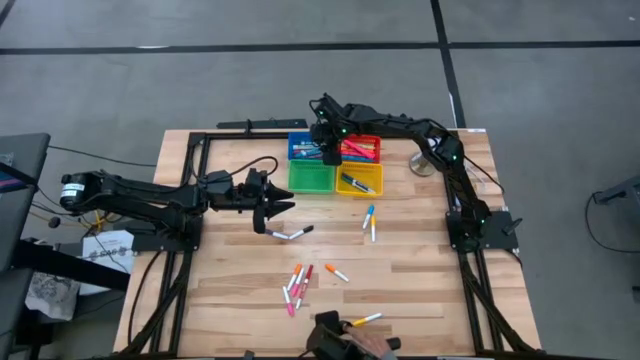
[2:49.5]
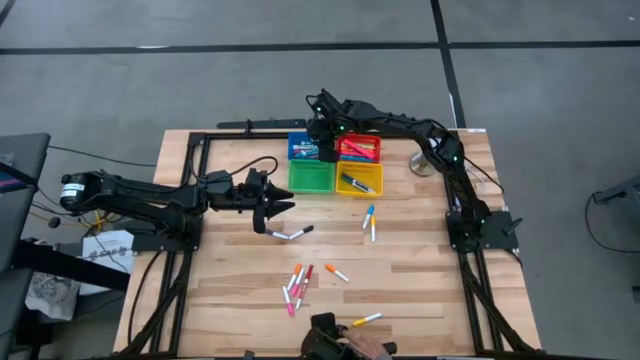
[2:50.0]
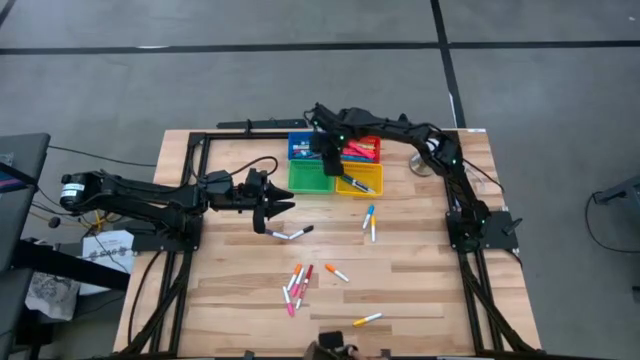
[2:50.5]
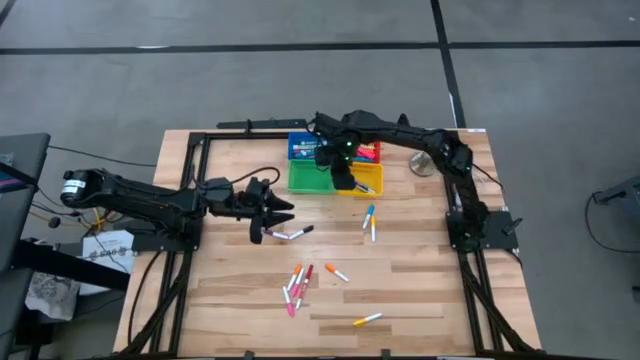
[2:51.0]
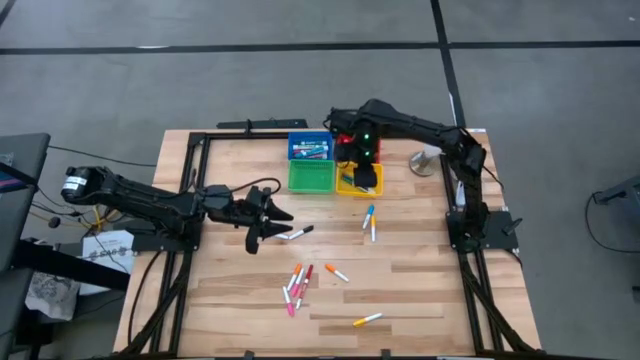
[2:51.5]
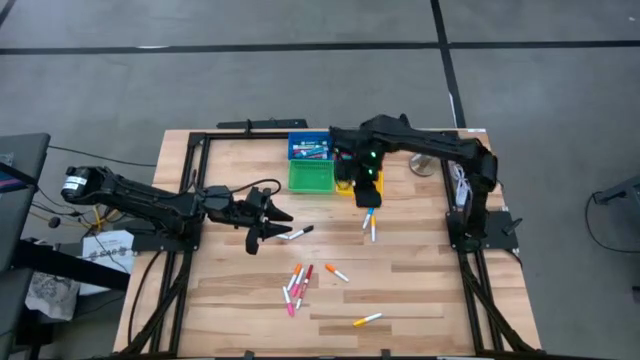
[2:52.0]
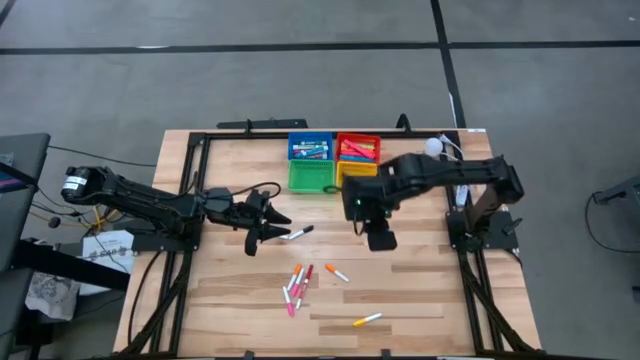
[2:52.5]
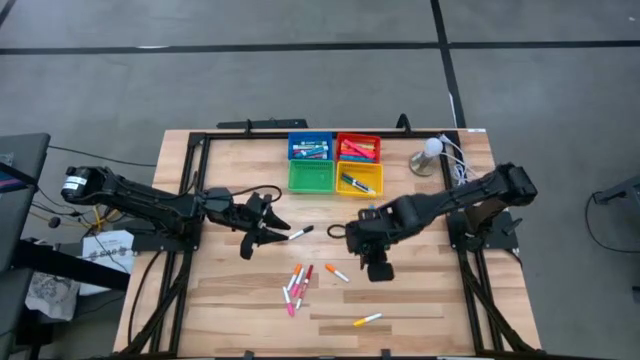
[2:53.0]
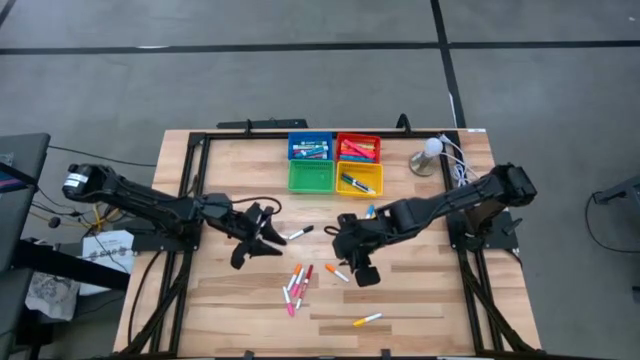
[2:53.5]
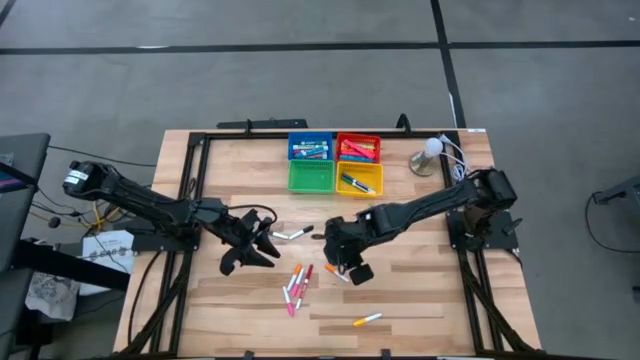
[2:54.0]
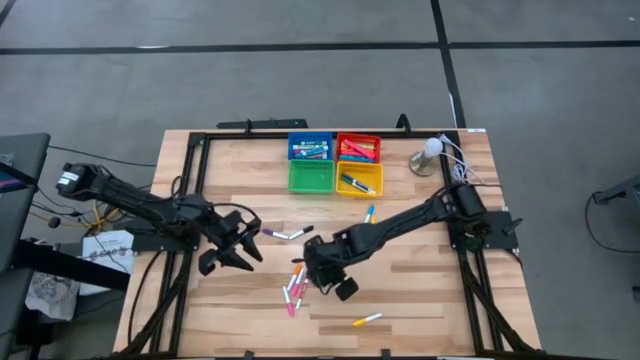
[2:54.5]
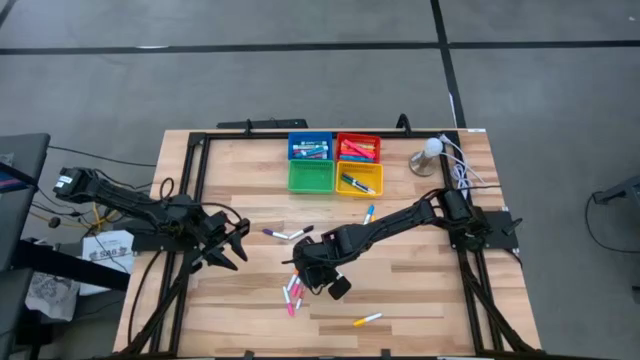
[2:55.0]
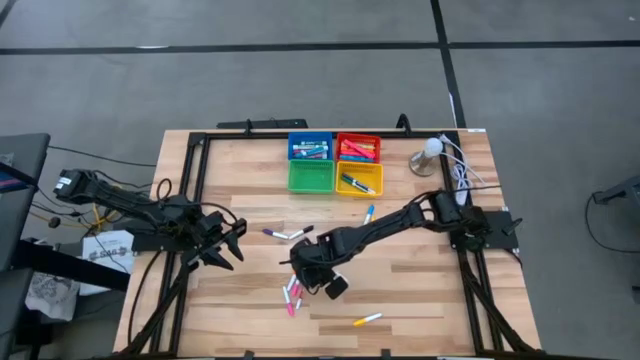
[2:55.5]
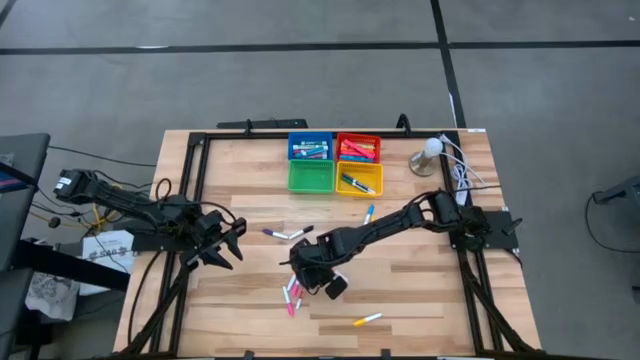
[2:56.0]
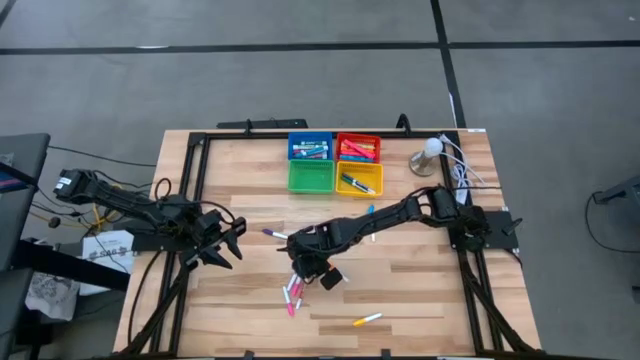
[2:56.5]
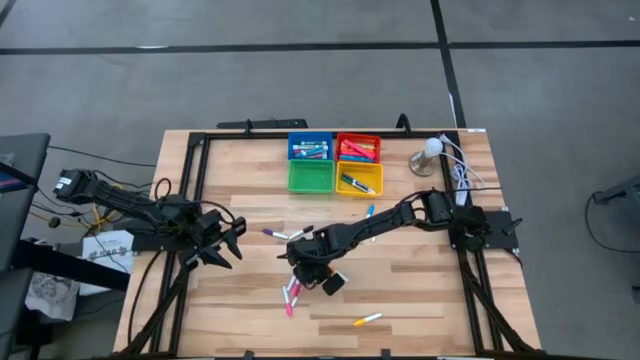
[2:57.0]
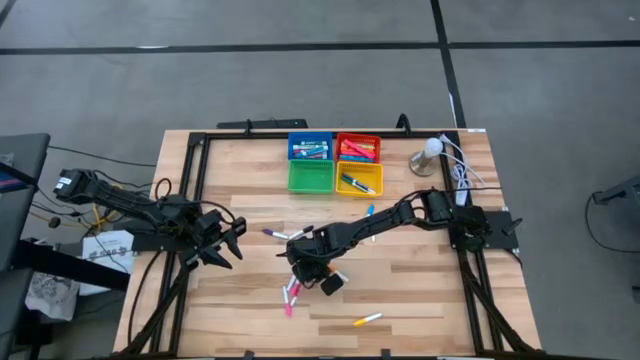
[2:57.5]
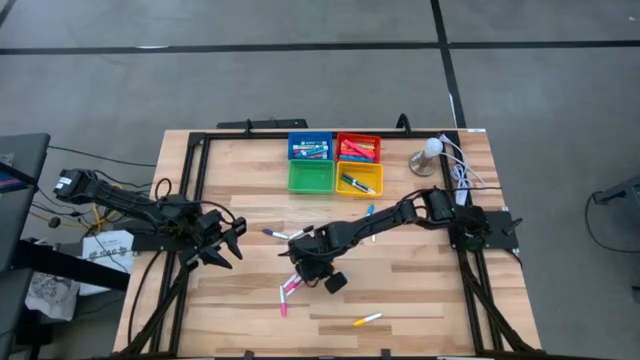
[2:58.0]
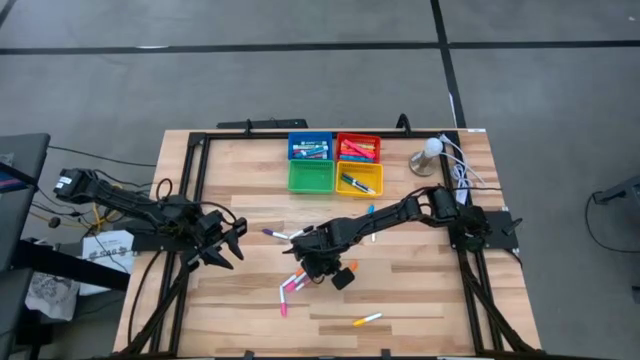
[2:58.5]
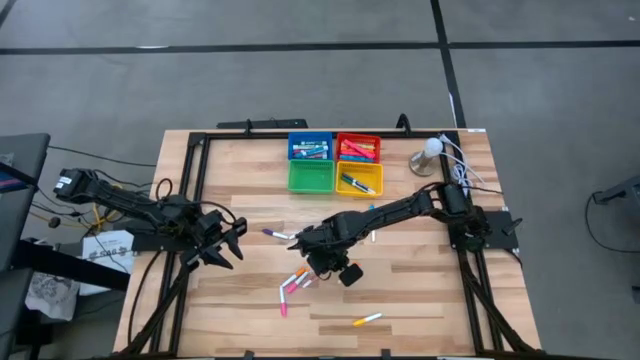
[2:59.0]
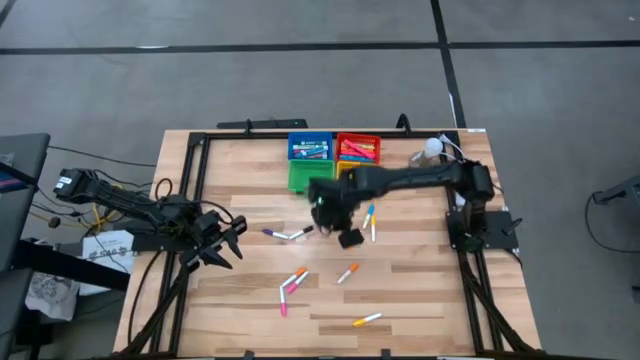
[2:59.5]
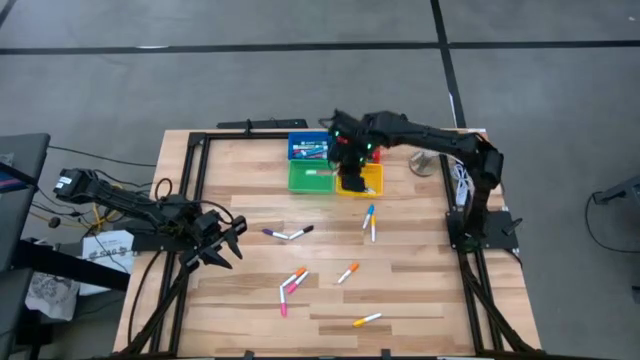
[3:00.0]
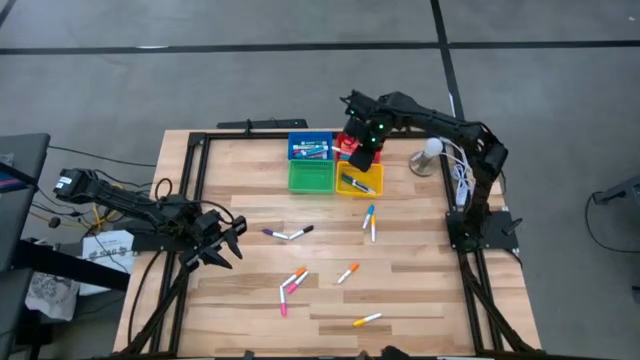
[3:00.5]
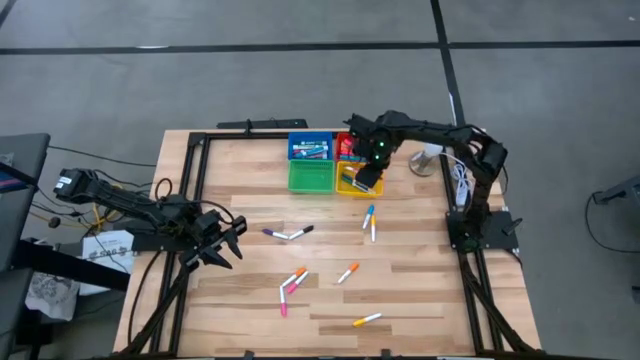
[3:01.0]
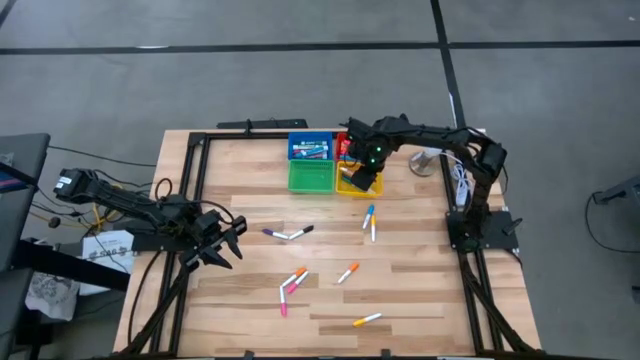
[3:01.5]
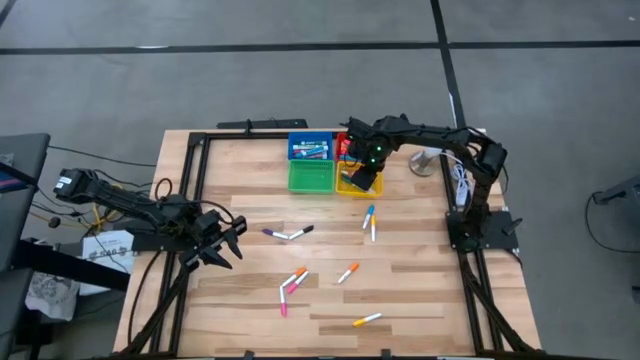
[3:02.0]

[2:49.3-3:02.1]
Task: Pick & Place Markers
Put the red highlighter in the yellow bin

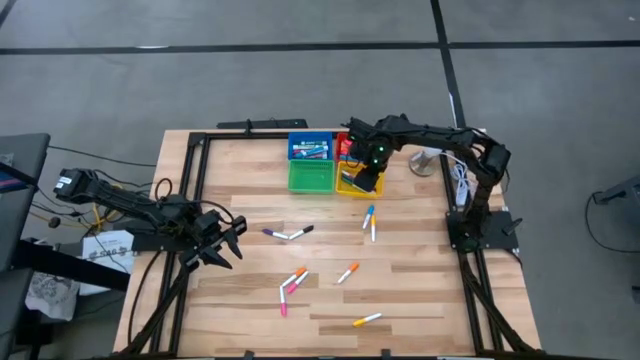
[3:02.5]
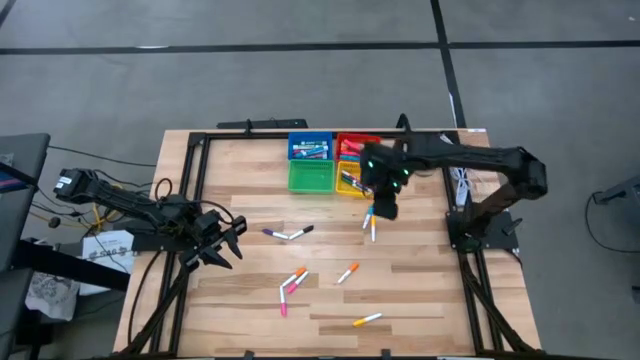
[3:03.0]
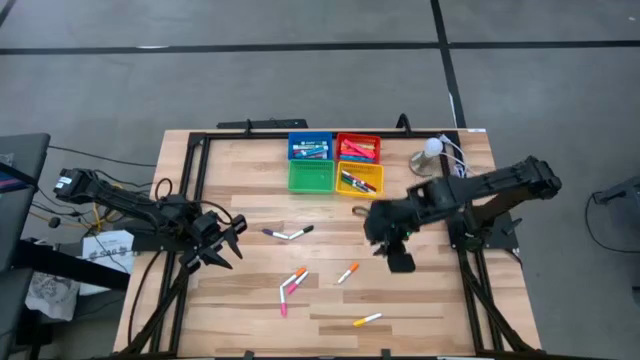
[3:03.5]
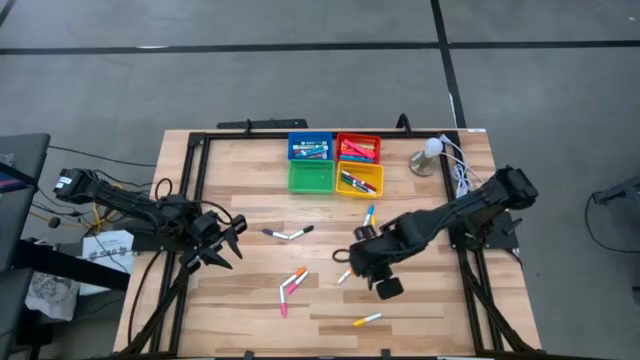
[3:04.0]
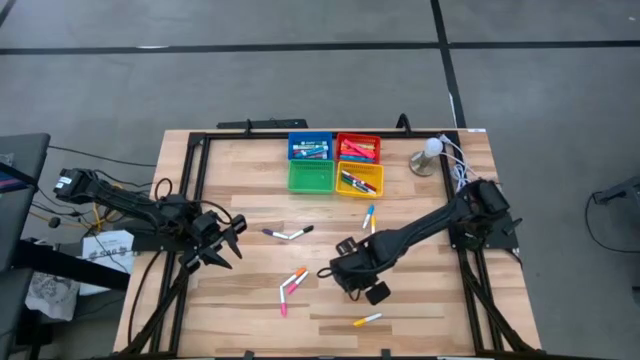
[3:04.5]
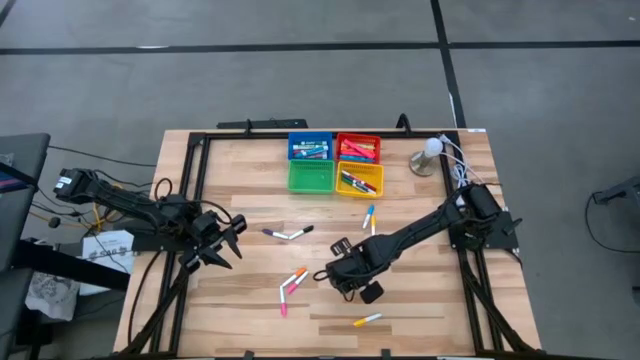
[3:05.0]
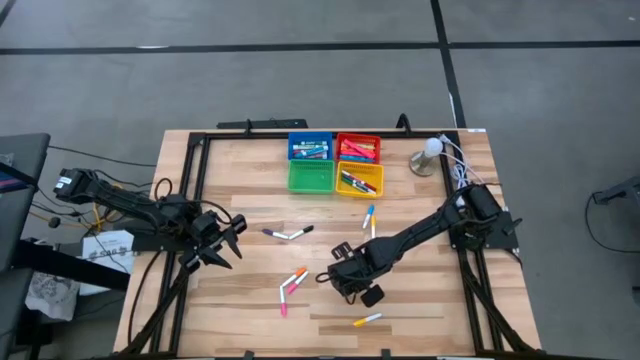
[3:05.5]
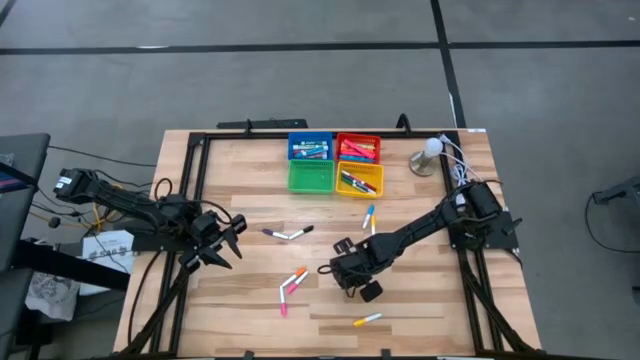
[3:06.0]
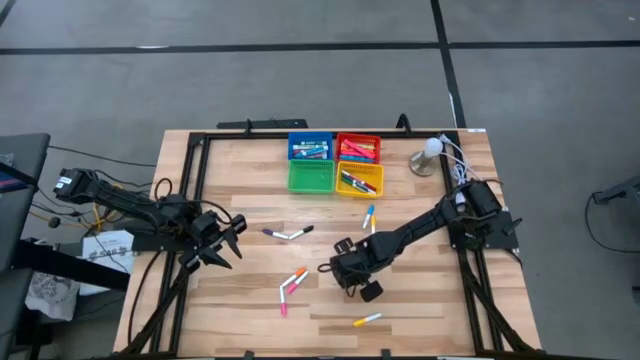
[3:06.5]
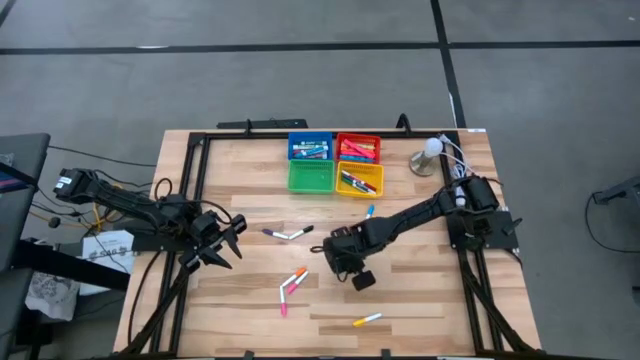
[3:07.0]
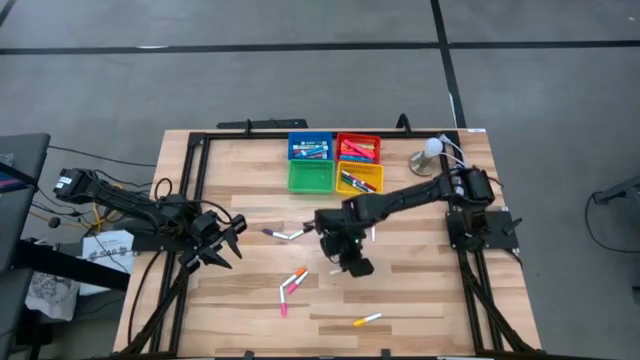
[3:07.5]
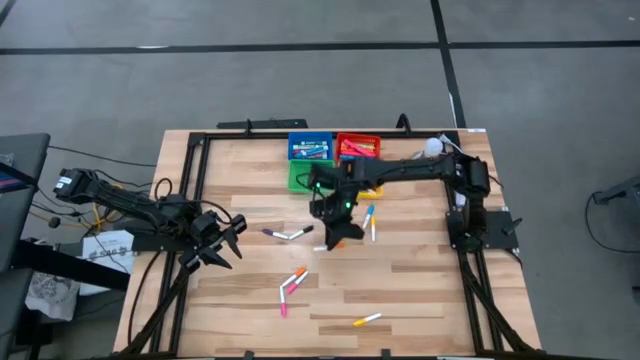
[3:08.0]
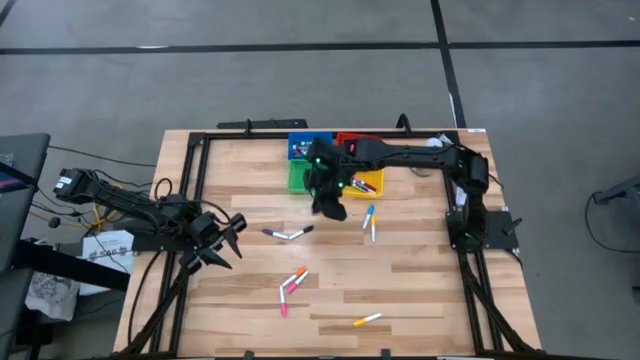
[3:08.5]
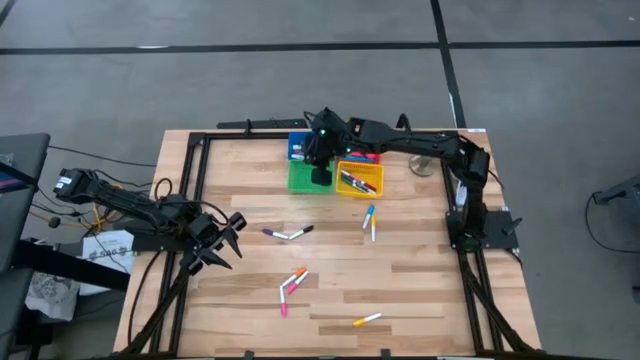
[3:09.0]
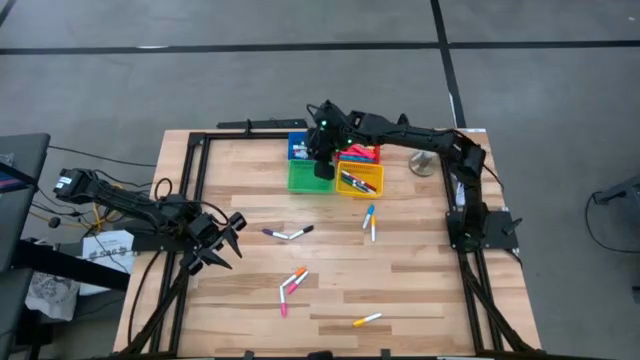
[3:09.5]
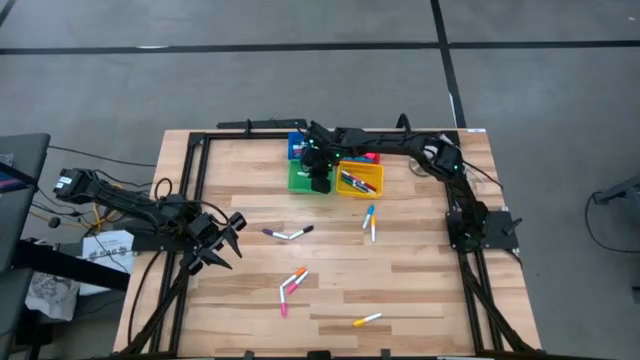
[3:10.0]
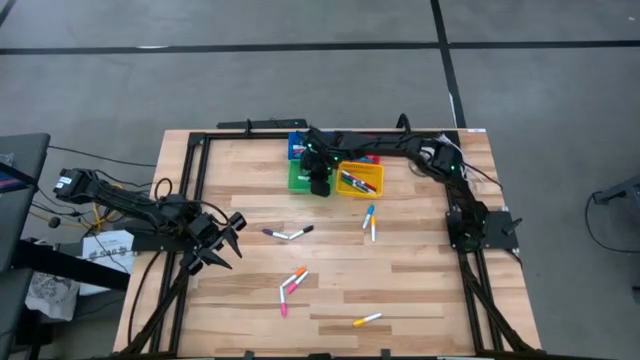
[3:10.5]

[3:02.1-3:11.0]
Put the orange highlighter in the green bin
